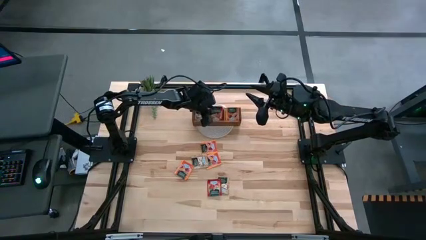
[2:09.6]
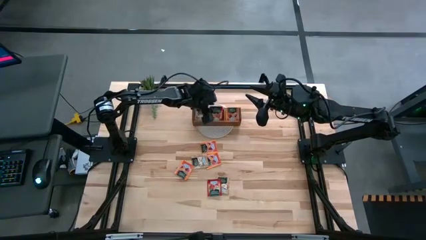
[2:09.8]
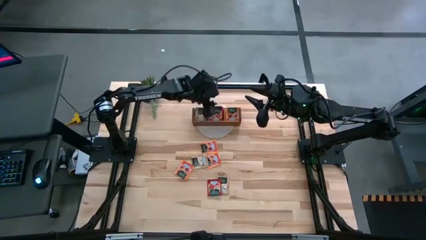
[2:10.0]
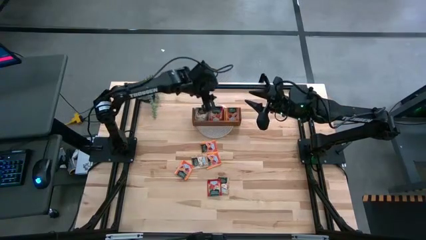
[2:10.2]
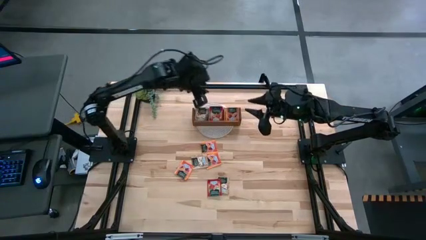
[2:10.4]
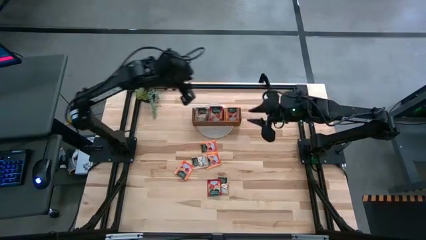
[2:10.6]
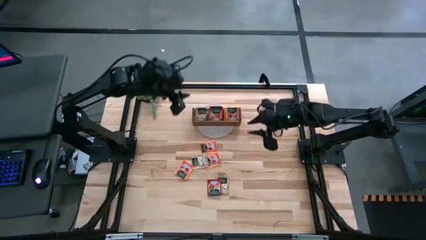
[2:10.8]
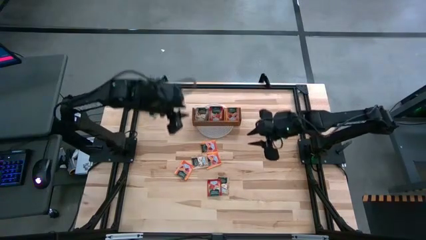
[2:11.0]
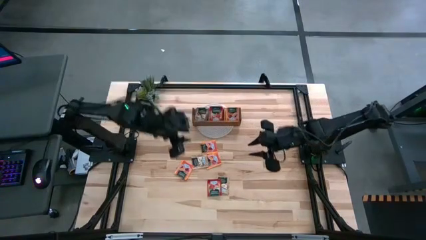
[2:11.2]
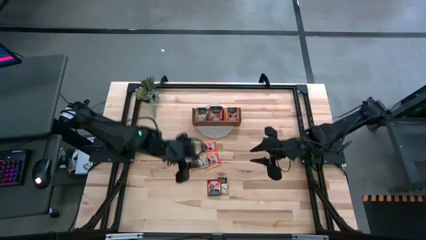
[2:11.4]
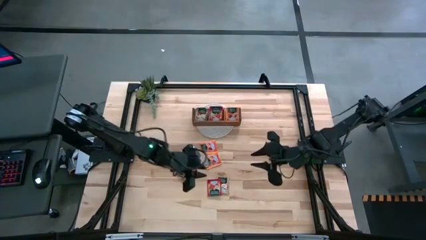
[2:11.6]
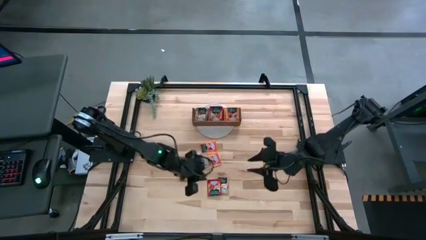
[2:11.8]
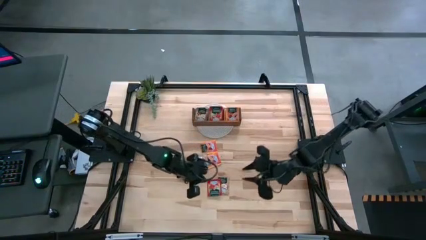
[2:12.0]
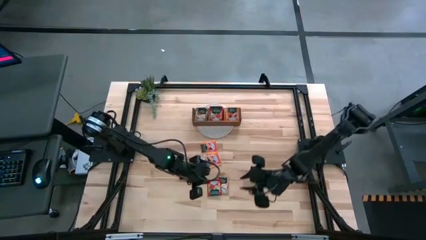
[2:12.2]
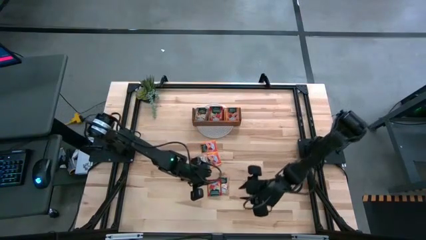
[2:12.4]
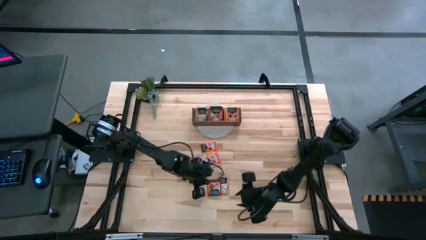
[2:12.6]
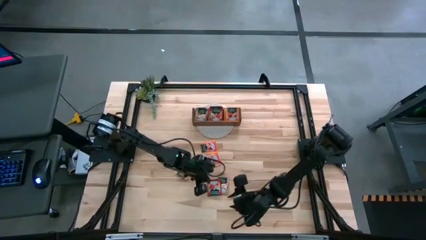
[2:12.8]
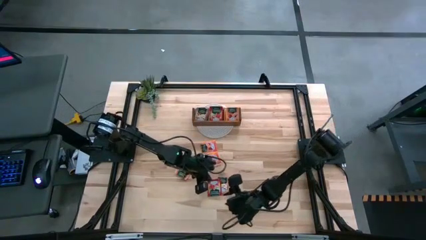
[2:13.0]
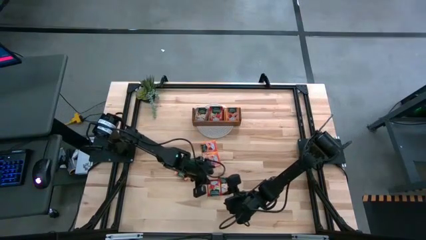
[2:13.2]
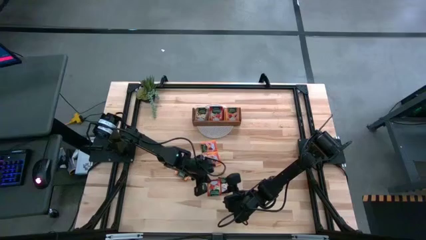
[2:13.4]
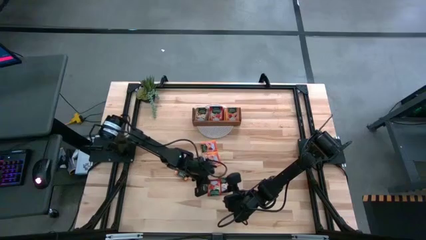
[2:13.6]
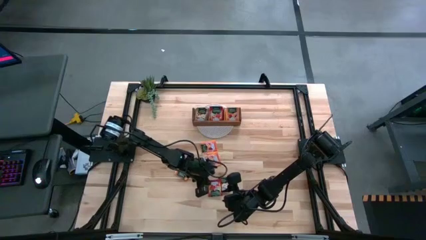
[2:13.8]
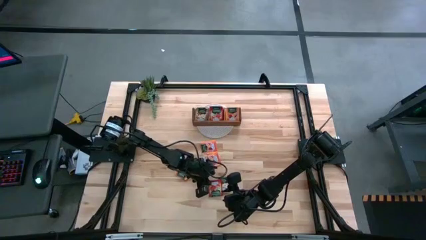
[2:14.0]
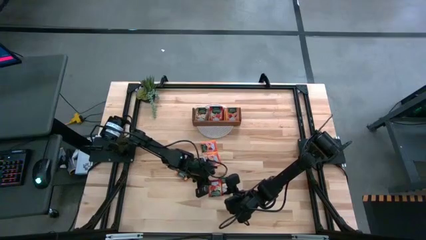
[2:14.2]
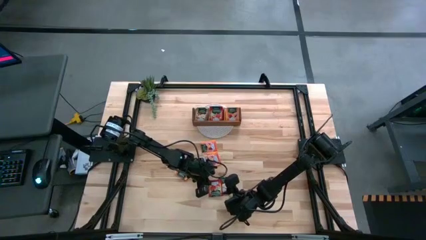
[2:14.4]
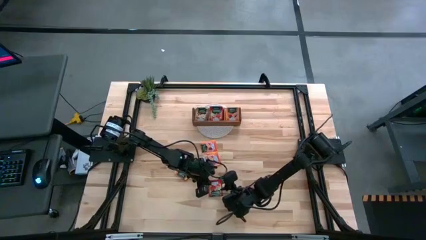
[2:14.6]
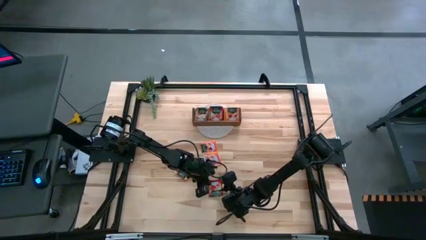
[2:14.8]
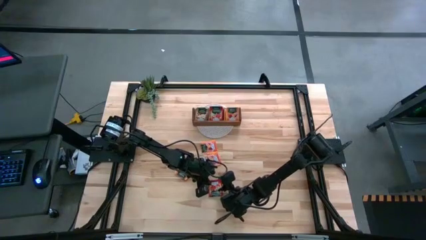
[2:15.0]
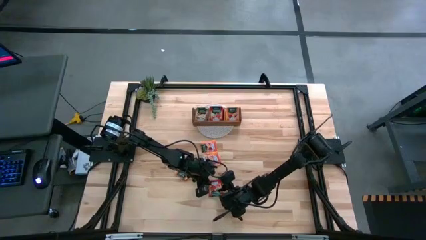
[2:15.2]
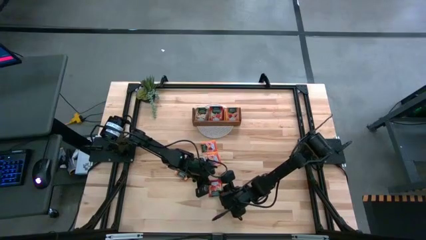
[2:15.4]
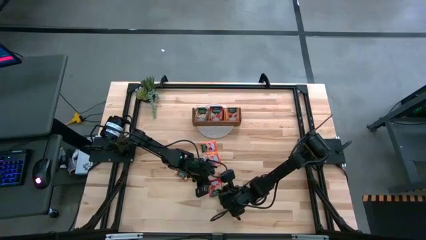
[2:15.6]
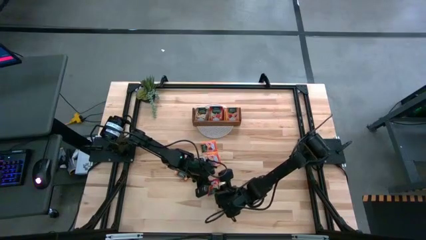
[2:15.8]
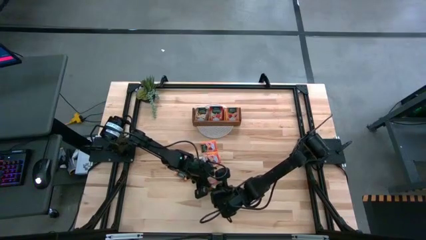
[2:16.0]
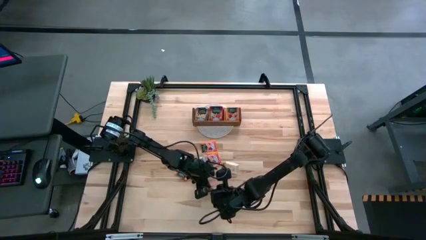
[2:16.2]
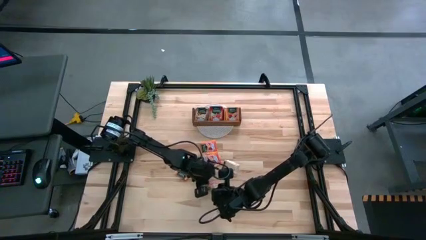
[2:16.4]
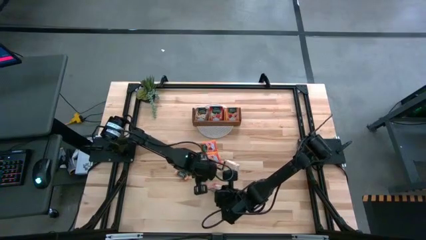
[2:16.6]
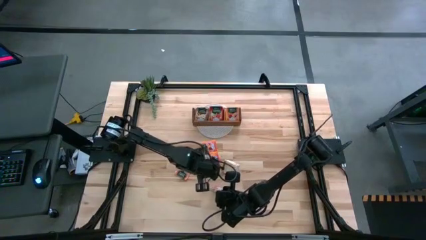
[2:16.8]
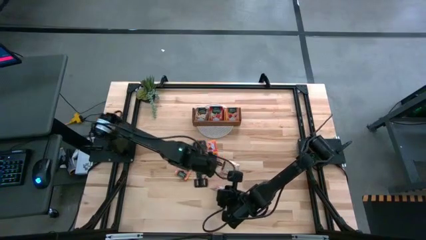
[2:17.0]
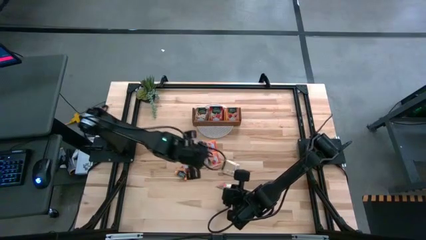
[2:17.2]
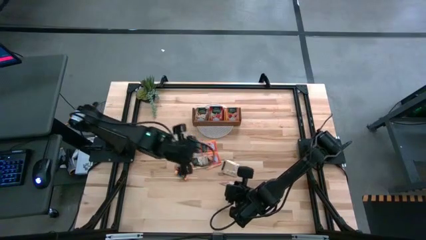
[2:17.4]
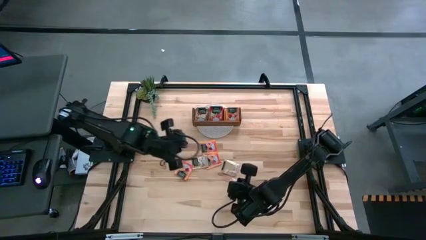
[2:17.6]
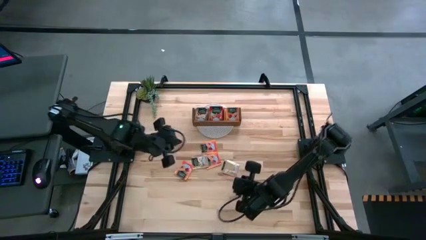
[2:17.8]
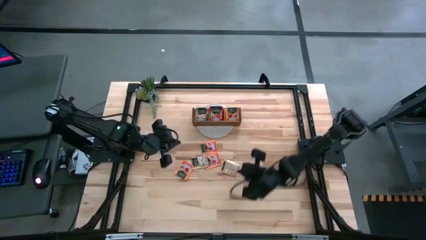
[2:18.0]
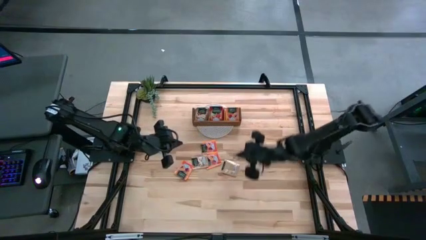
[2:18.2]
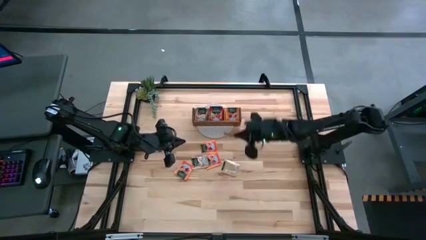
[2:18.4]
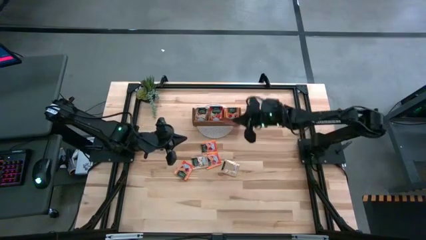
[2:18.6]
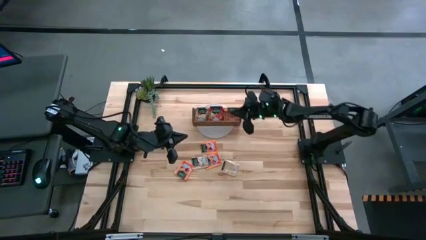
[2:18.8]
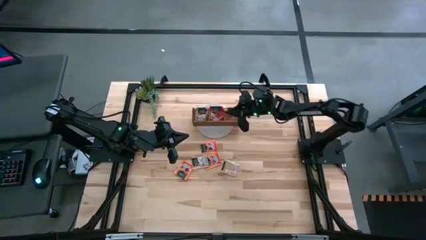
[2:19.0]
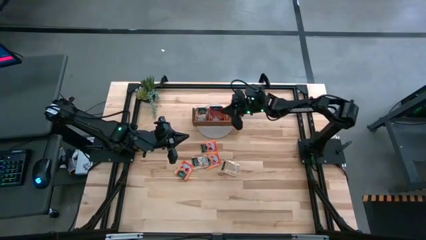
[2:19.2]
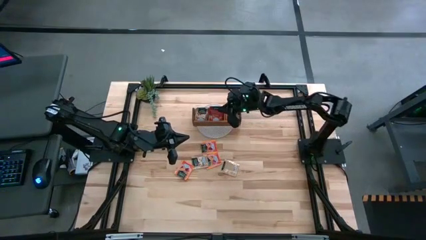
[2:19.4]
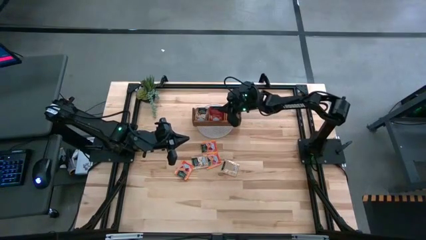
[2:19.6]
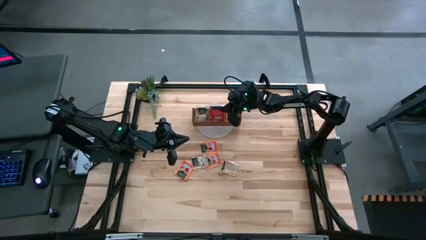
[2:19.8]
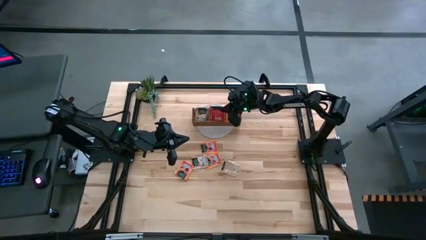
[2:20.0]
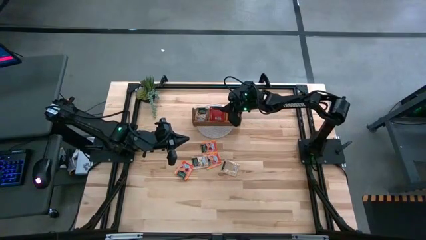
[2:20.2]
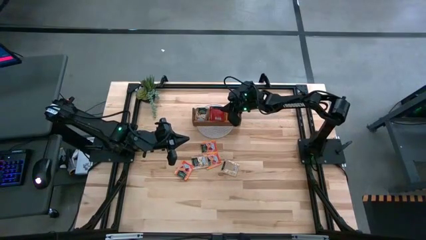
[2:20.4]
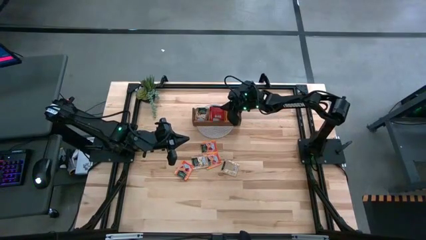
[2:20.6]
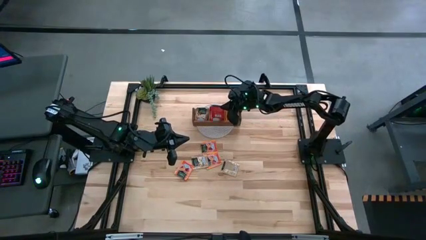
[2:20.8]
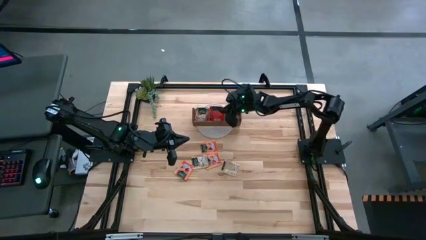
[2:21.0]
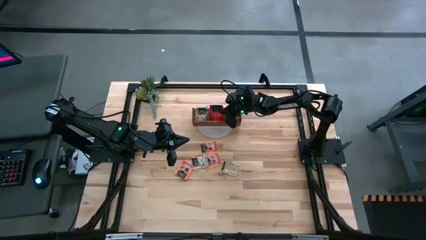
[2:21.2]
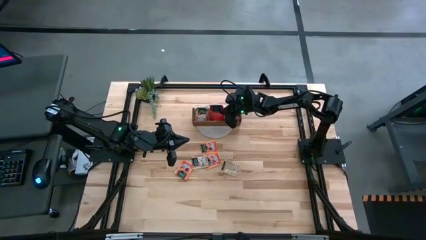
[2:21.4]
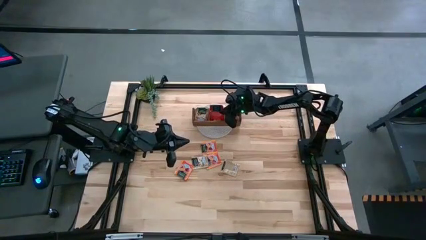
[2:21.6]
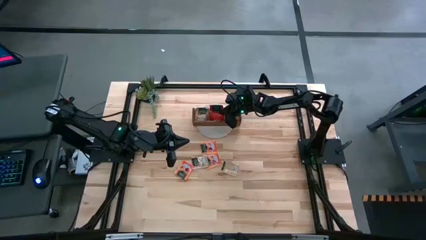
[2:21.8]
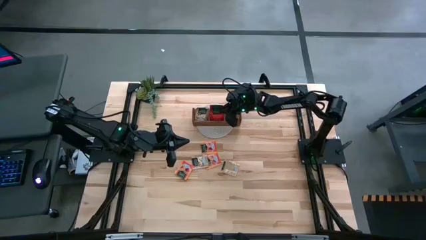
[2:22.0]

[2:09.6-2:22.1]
Task: Pick & Place Tea
Put the red tea bag in the middle section of the wooden organizer

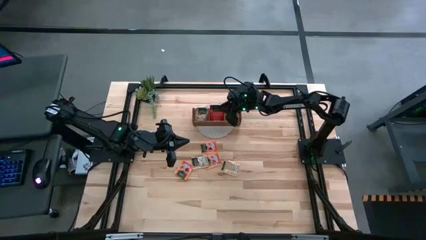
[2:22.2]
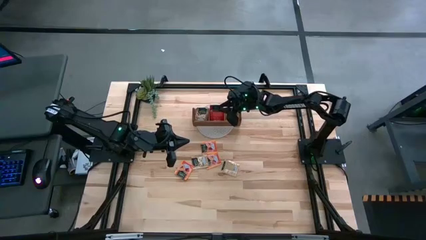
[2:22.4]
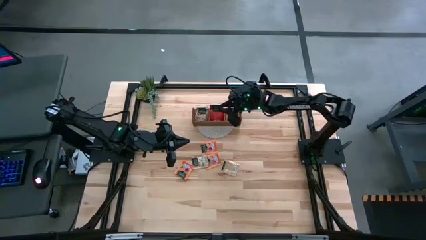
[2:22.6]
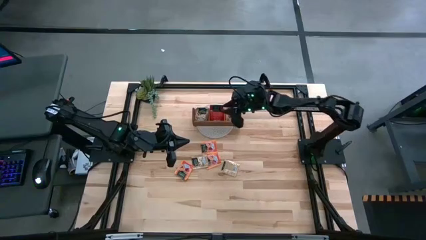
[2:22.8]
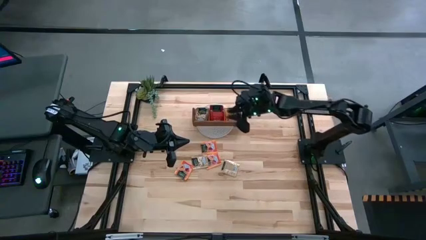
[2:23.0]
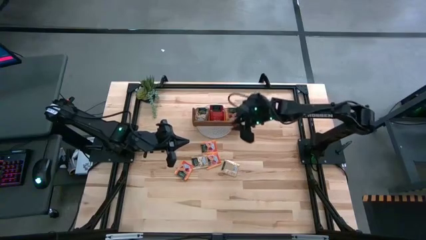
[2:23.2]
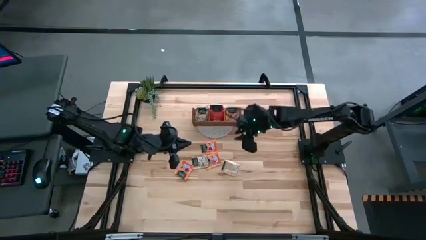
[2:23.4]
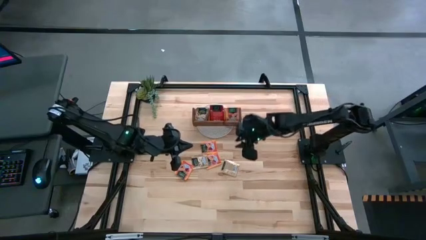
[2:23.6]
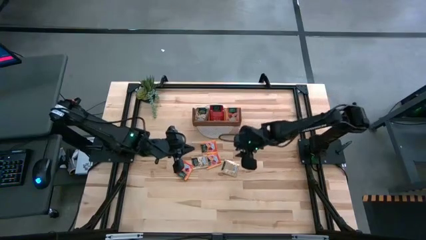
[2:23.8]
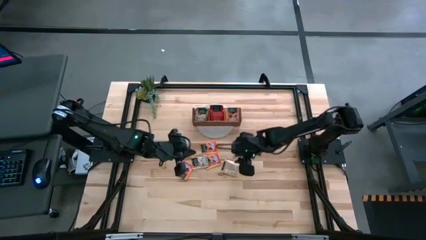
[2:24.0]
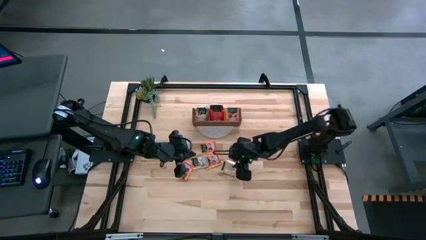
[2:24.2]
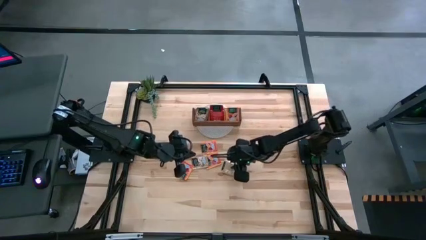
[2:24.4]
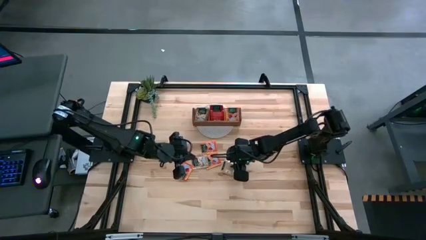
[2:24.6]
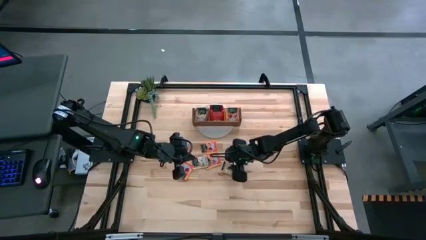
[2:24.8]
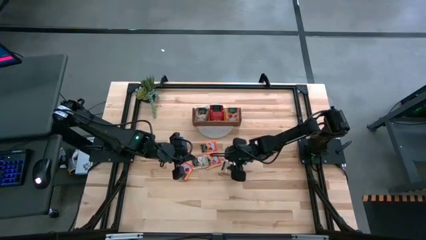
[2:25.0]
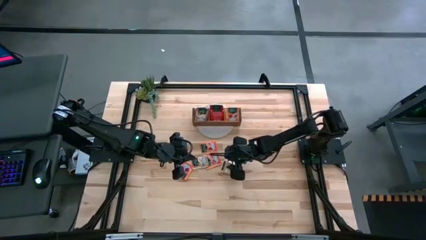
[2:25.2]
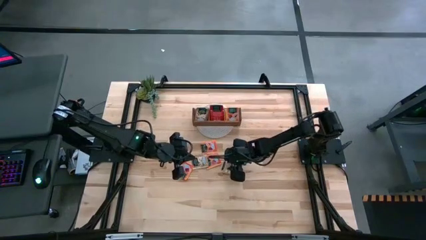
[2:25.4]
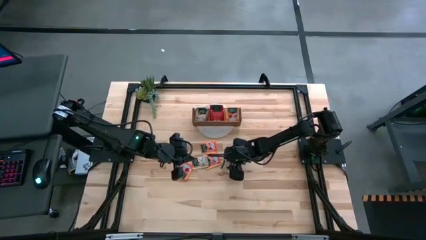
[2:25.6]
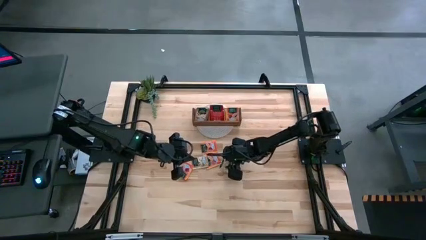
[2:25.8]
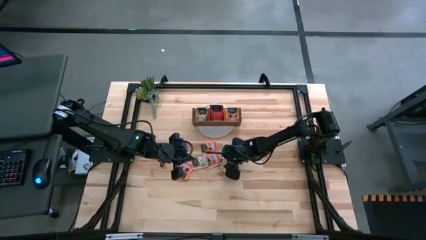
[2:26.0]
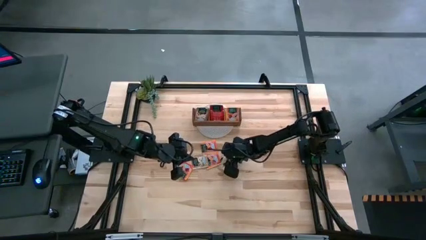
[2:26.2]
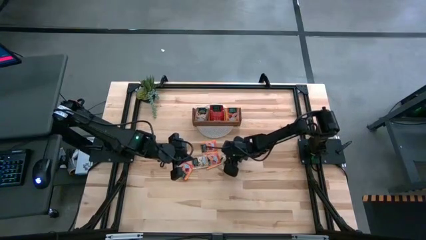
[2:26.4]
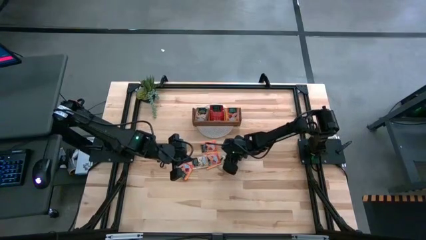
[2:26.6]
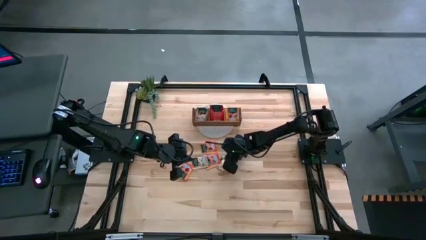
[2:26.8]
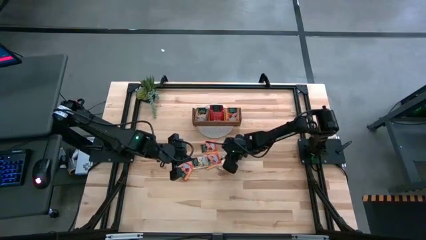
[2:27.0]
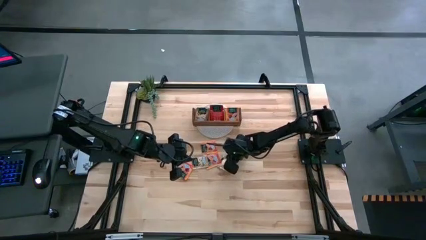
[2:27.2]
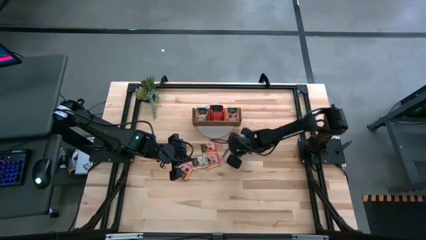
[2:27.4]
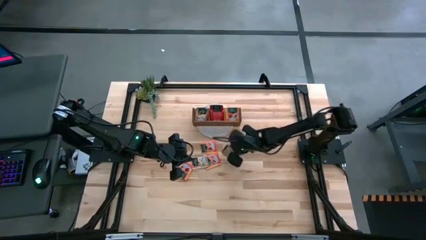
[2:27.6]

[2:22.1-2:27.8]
Put the brown tea bag in the left section of the wooden organizer
